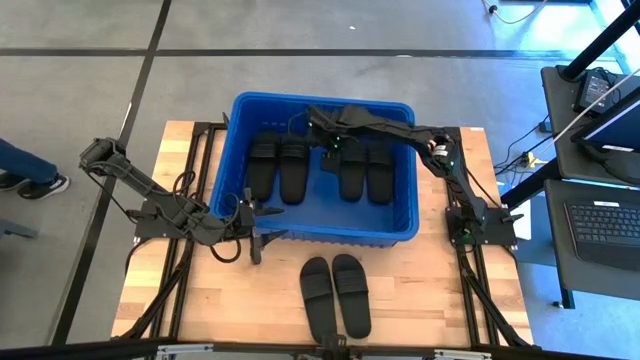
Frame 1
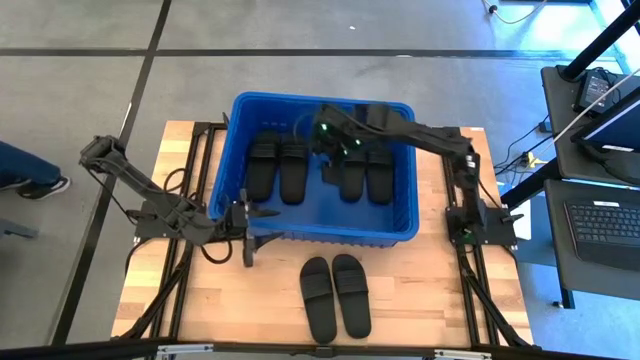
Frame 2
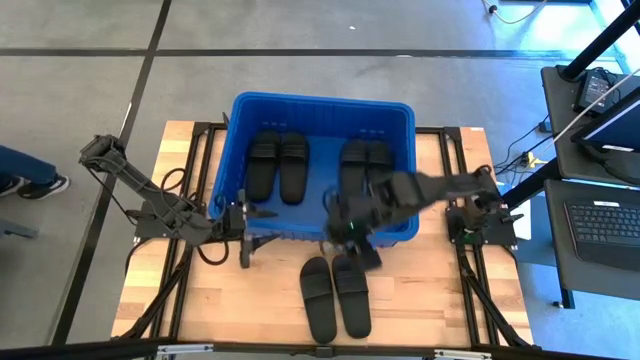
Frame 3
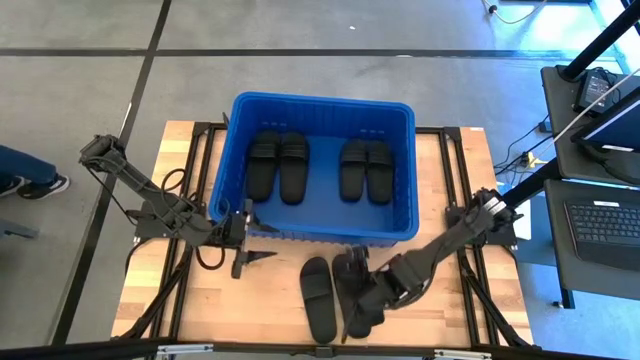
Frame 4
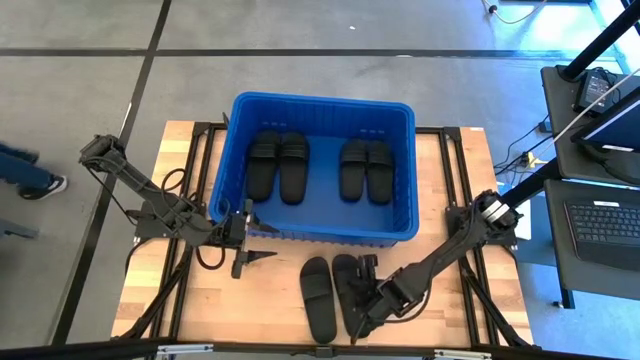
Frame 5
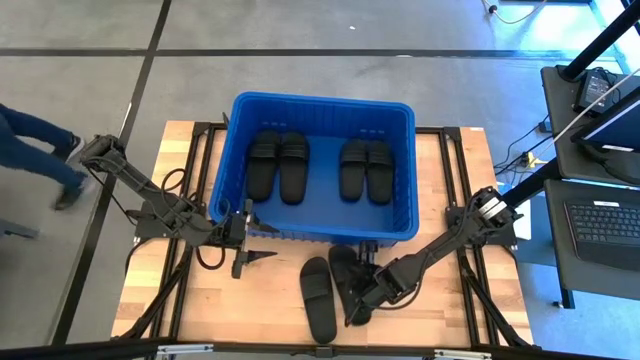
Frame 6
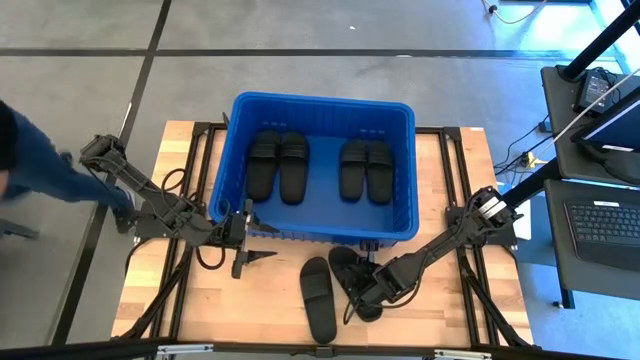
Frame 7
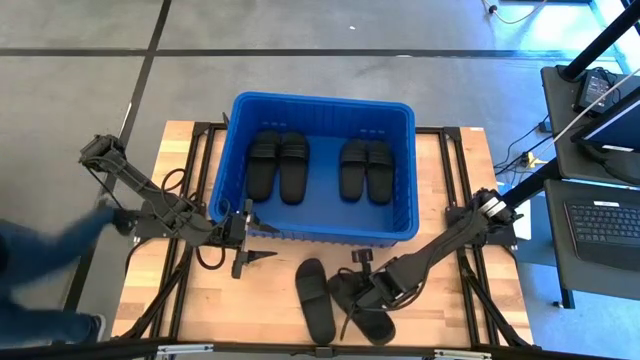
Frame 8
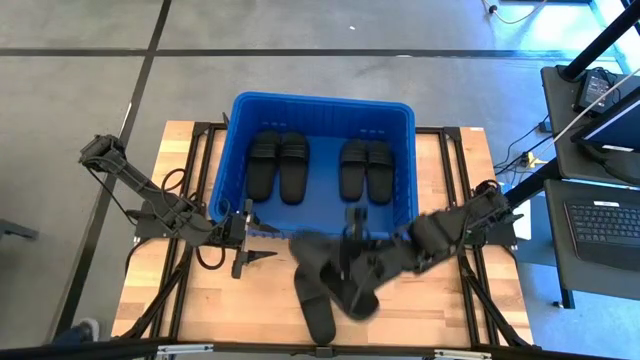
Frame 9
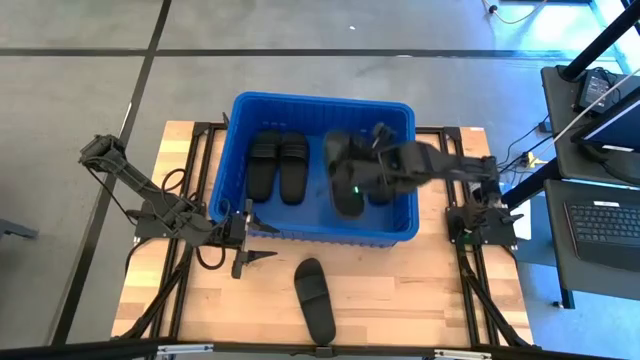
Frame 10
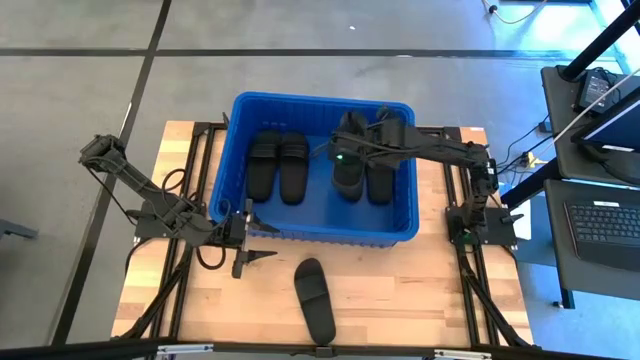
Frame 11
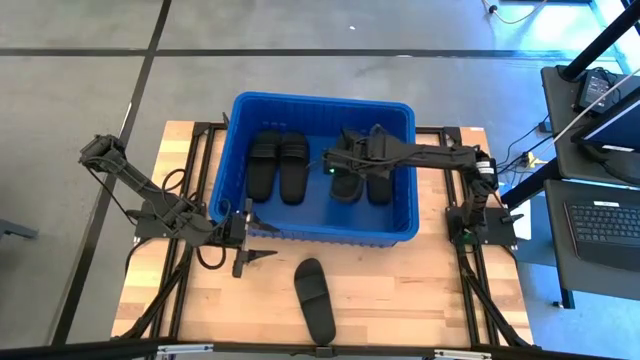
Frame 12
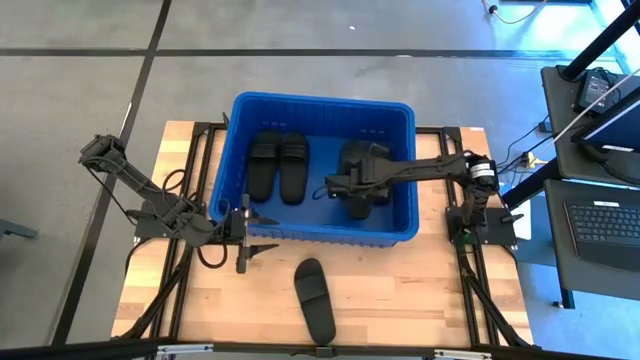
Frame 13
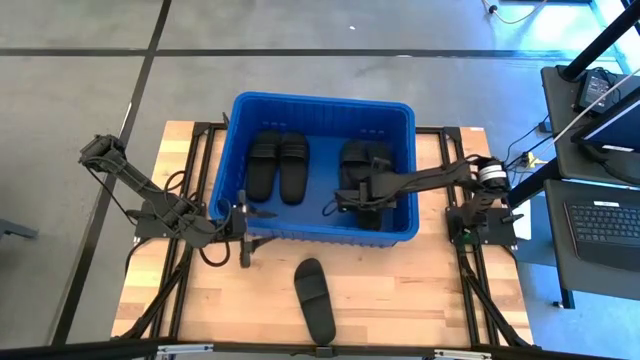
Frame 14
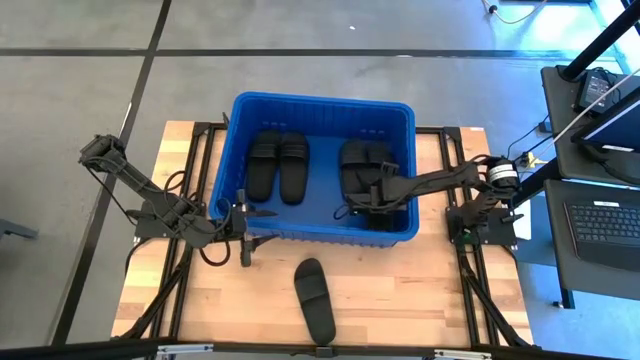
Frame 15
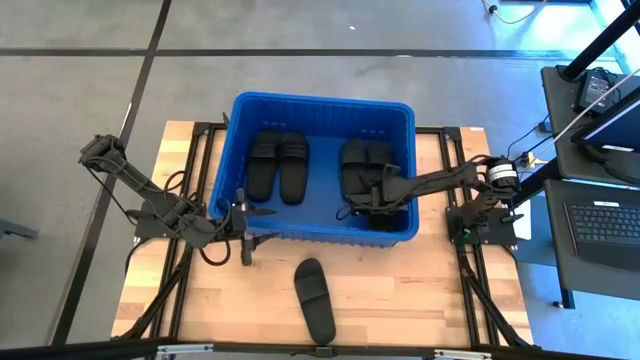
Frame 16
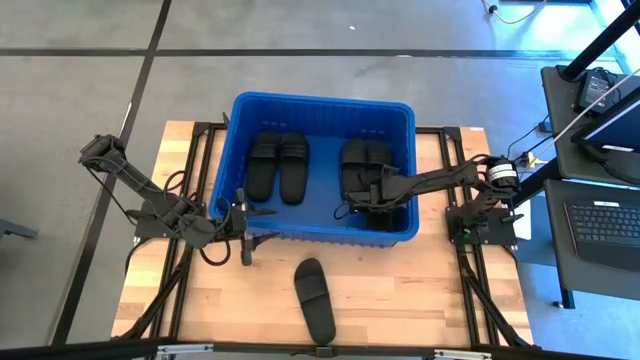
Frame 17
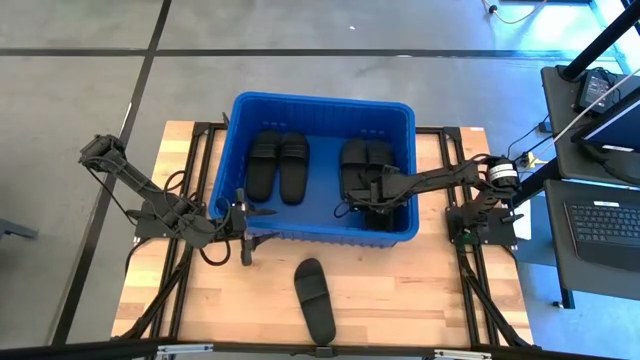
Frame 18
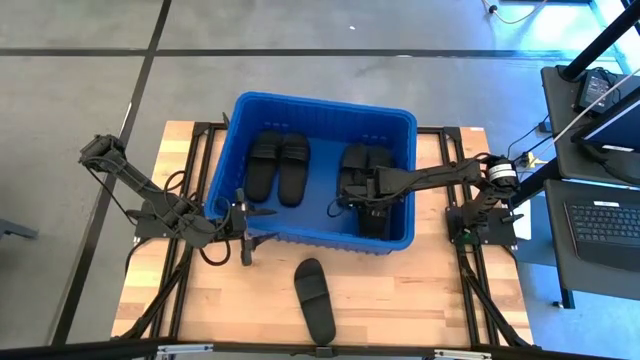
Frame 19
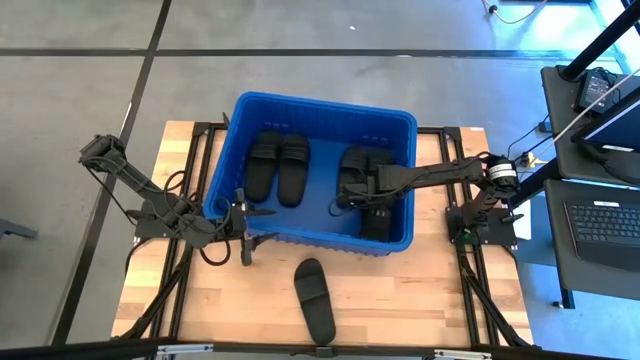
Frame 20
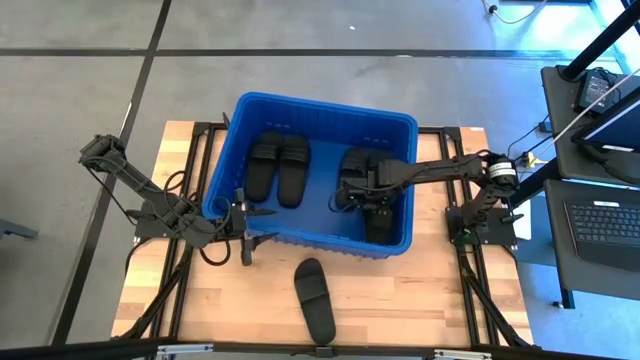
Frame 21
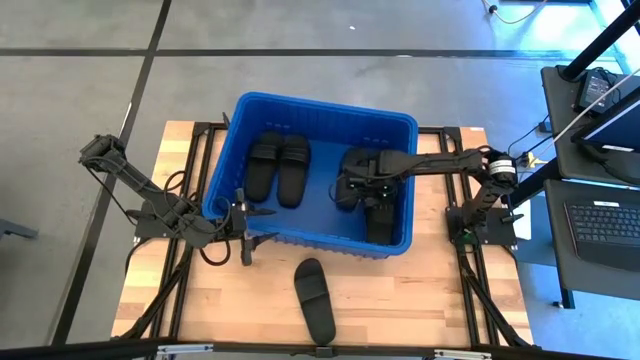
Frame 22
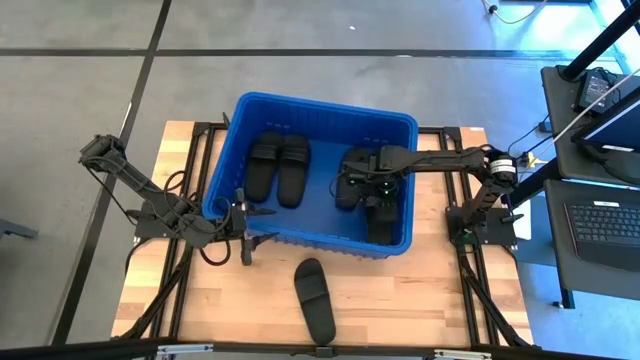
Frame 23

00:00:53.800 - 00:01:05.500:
Task: Pick and place slides into bin
Put the black slide into the blue bin

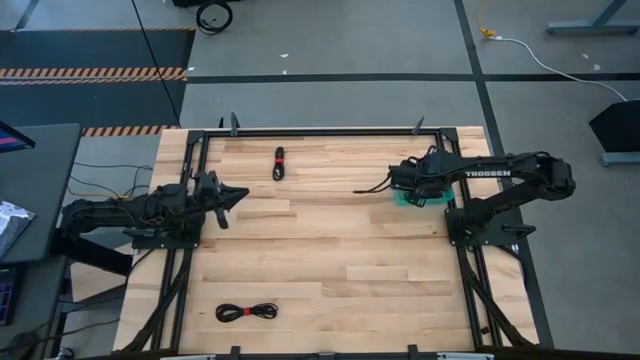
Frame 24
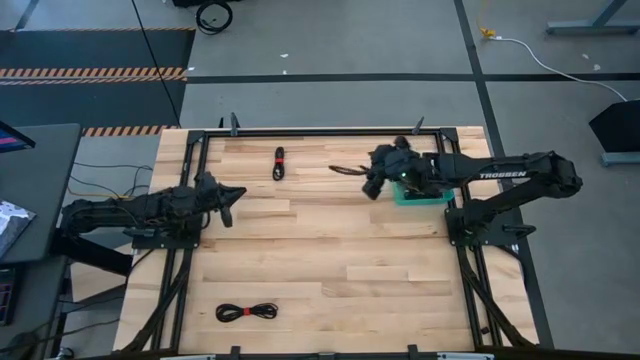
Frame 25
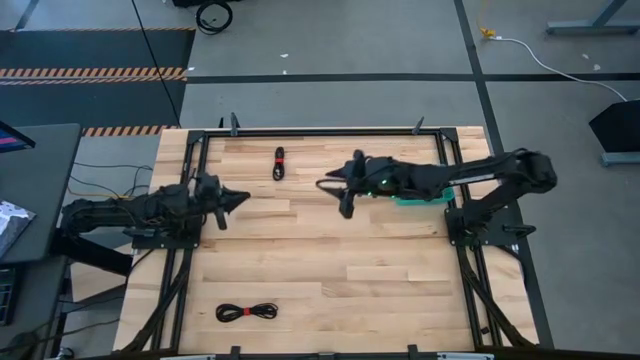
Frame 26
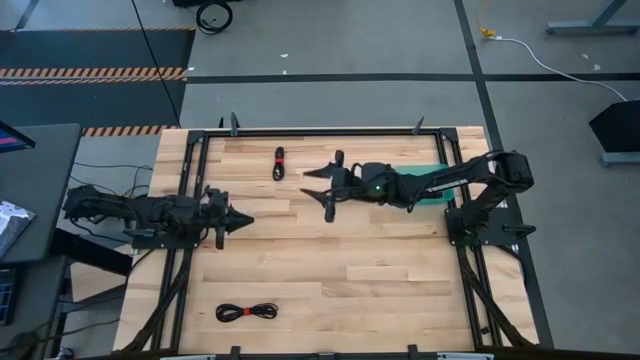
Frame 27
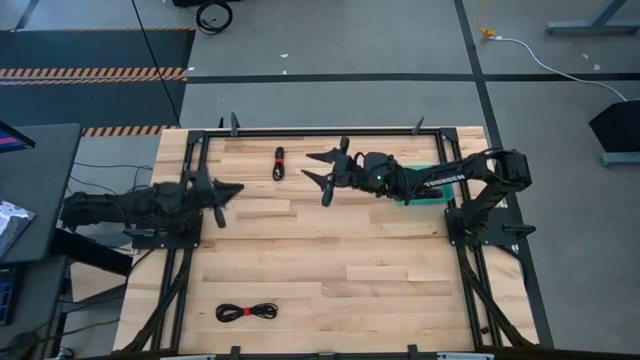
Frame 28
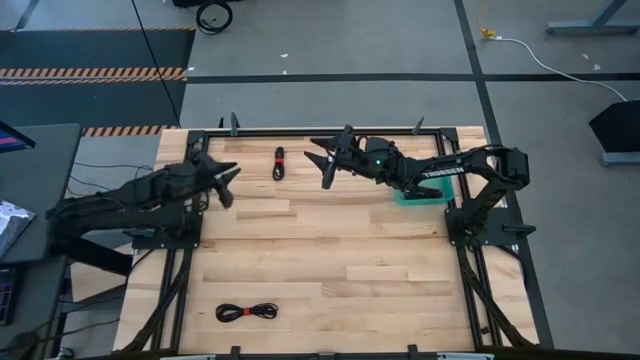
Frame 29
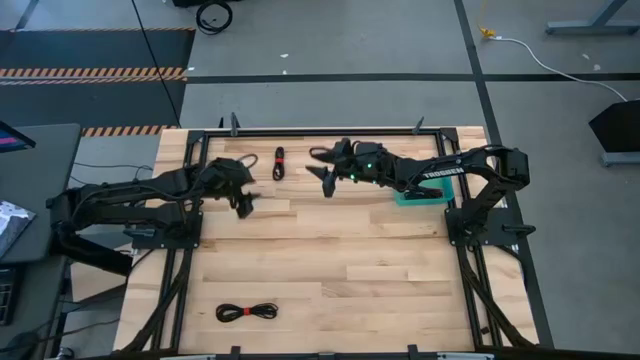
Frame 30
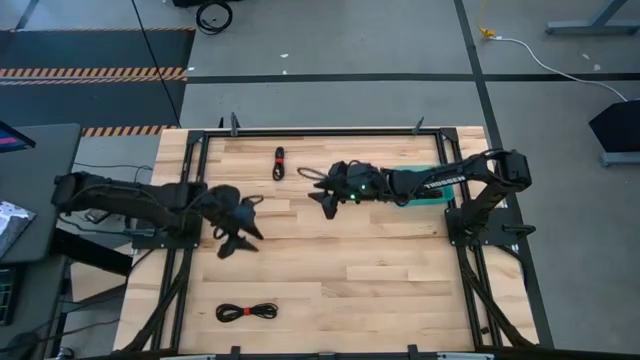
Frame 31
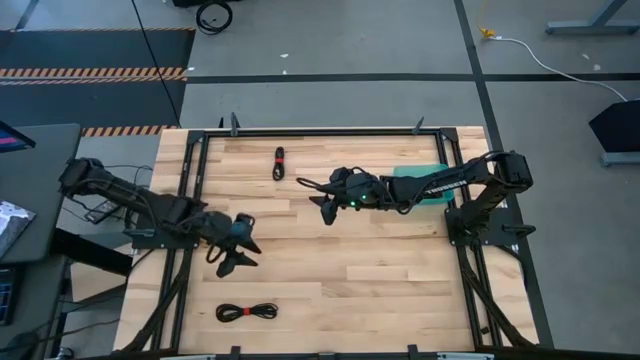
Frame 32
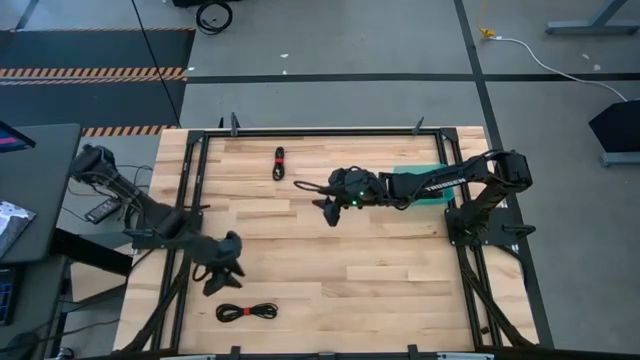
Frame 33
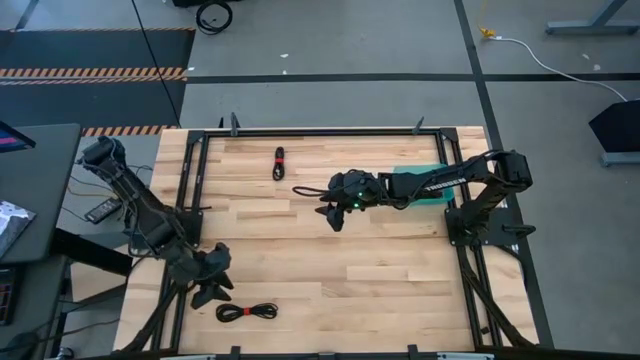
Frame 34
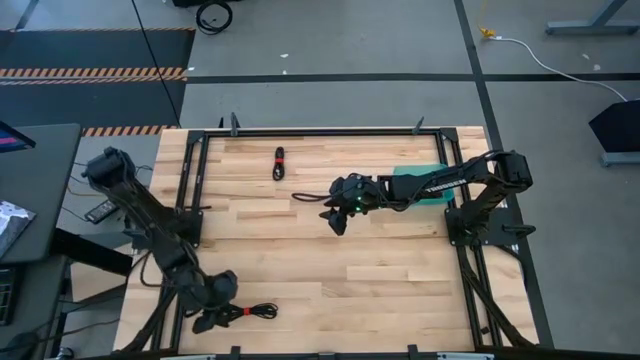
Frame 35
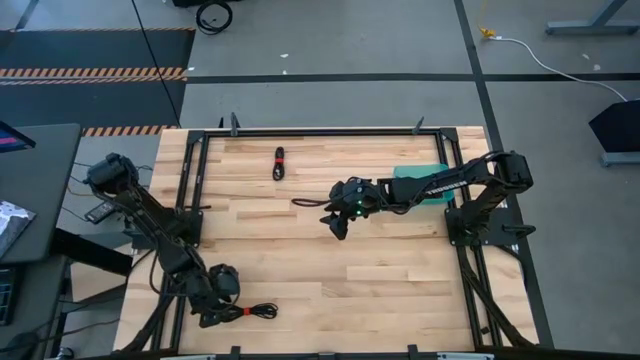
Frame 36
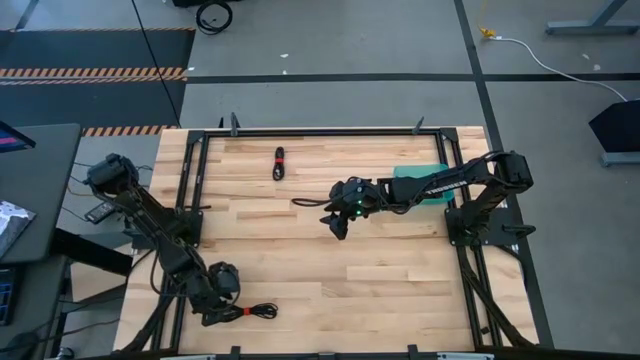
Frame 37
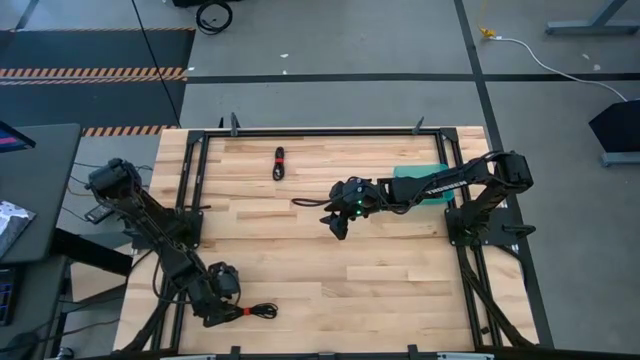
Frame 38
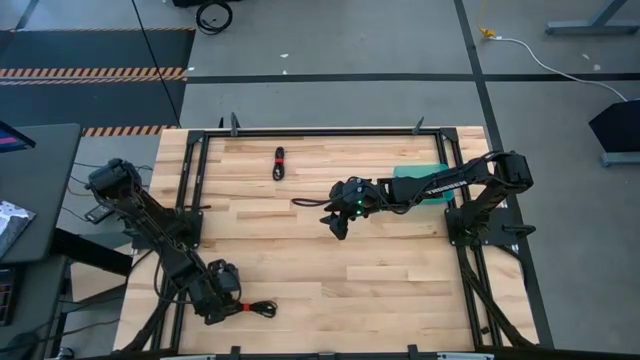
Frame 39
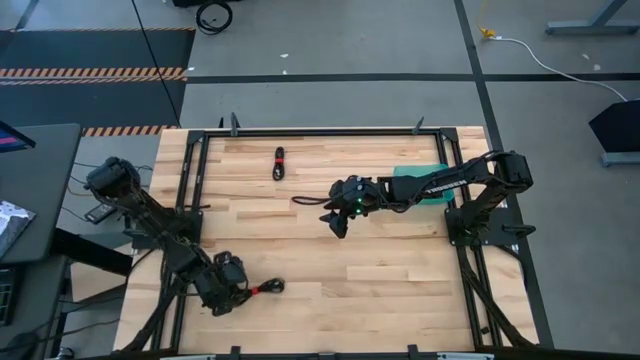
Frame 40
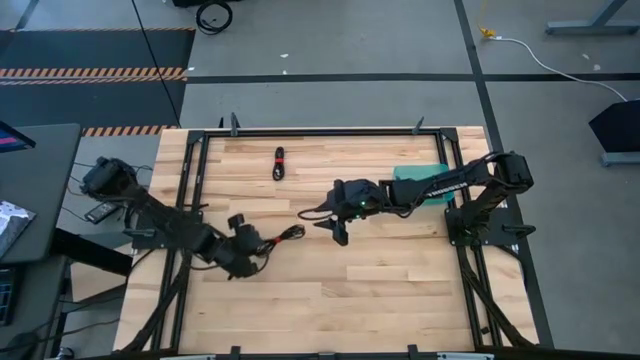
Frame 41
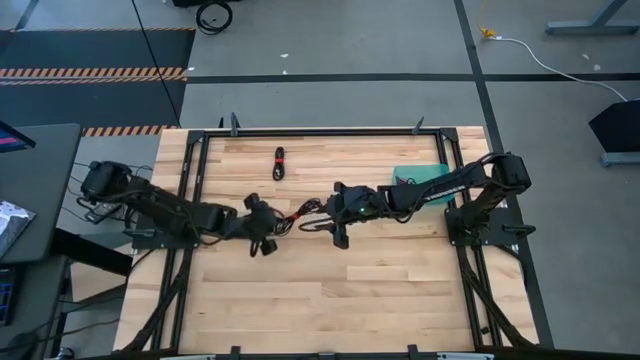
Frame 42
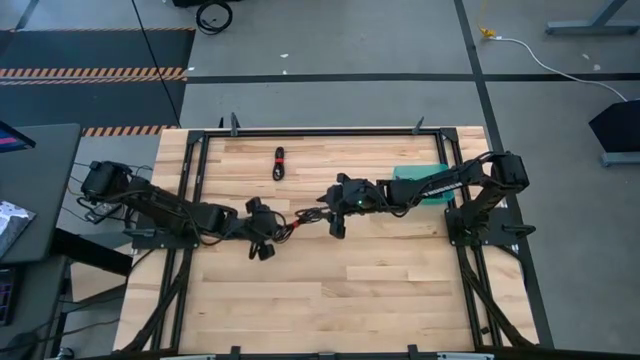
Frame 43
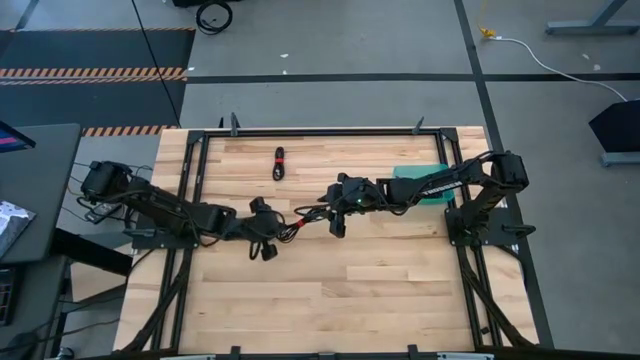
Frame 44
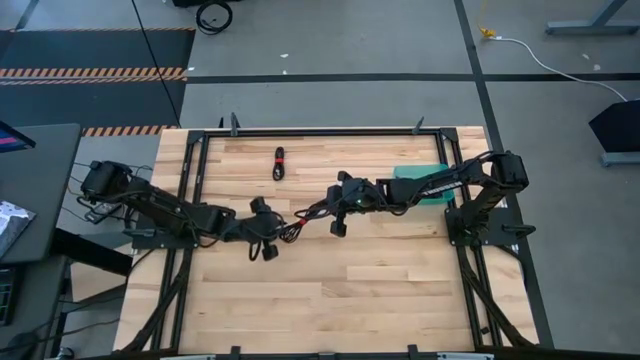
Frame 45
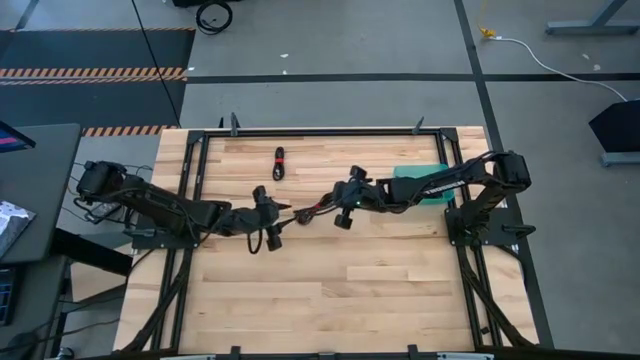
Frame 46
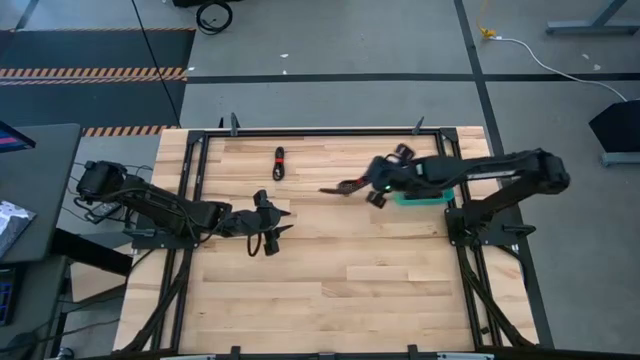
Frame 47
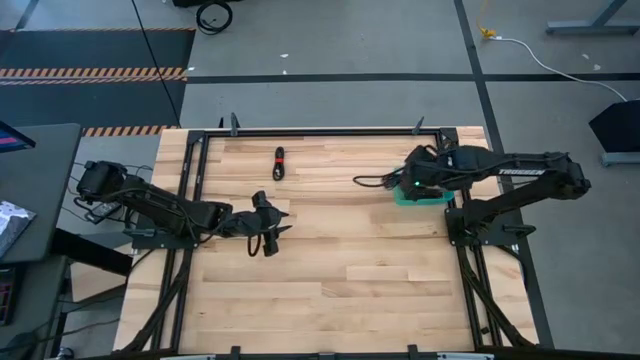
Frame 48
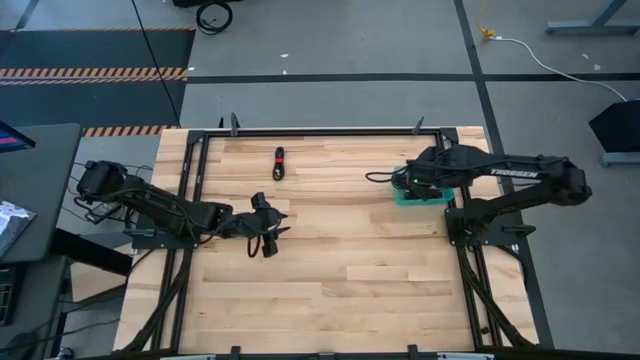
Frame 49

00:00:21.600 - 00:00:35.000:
Task: Pick and place USB-C Cables
Put the bottom black charger cable into the bin
